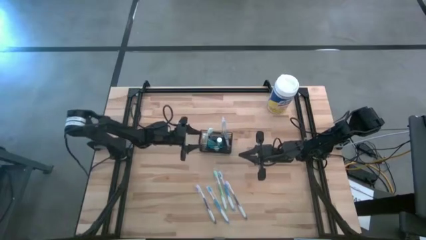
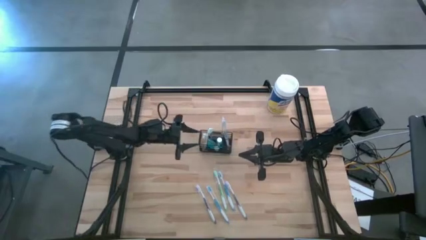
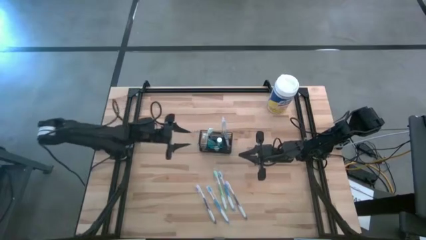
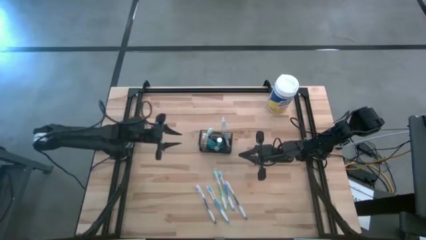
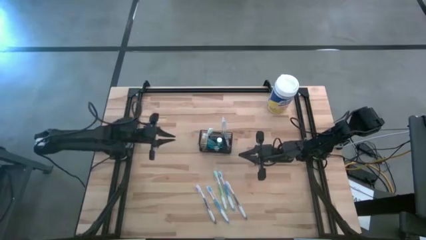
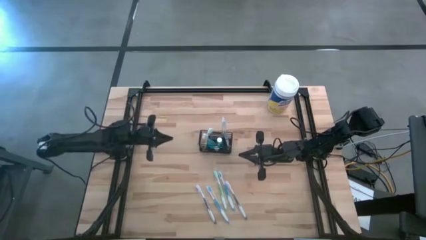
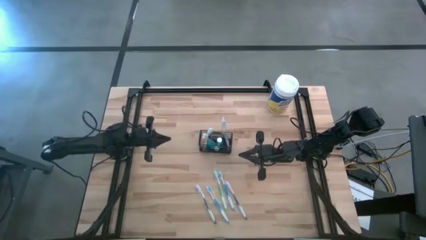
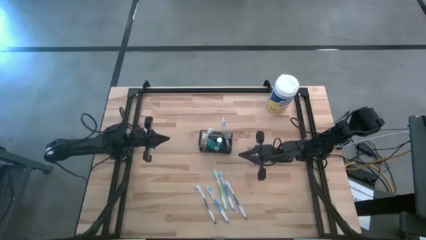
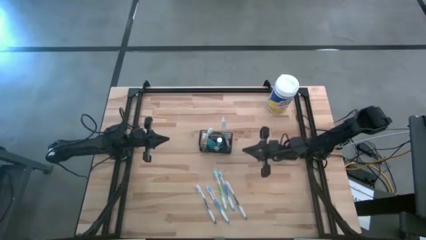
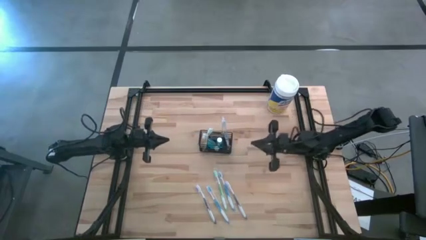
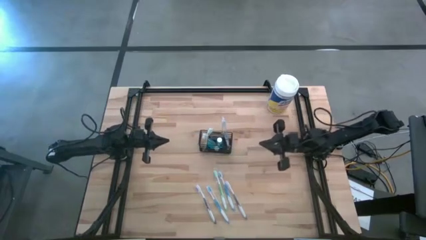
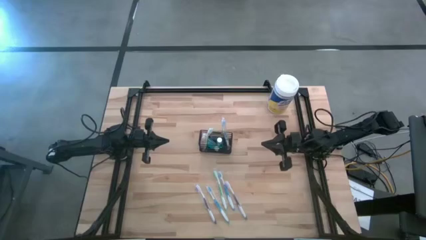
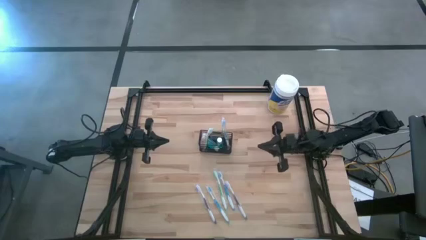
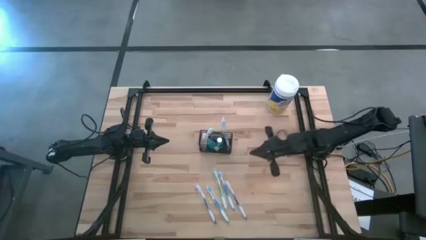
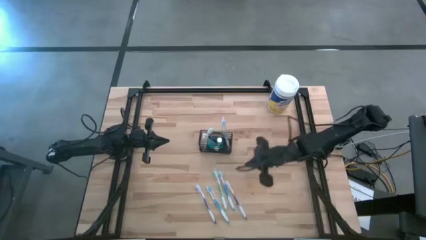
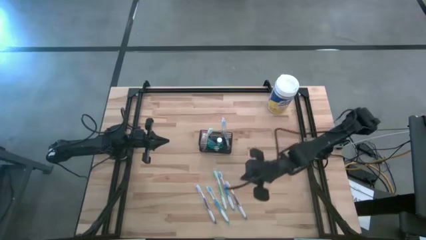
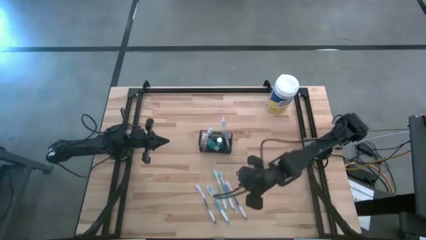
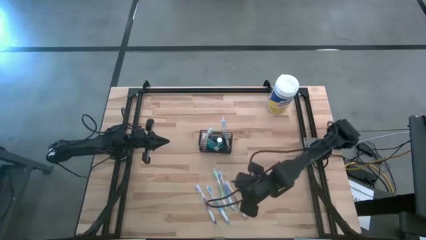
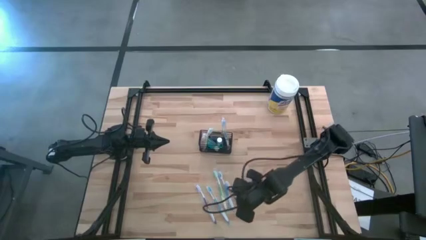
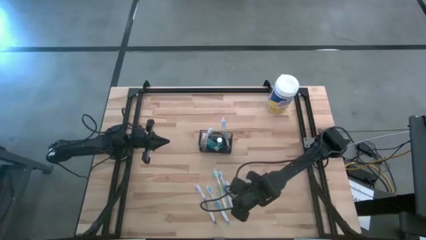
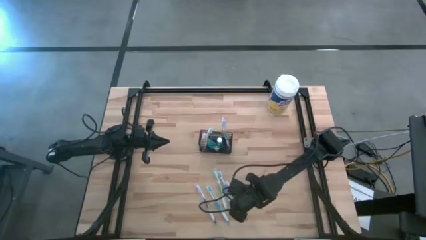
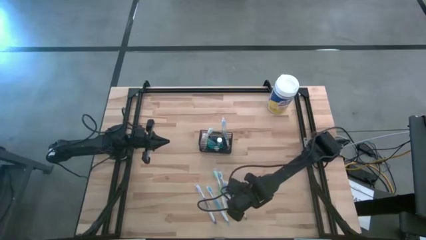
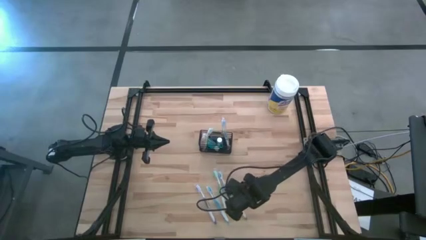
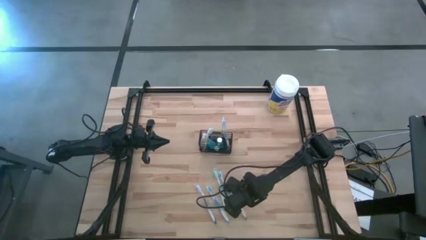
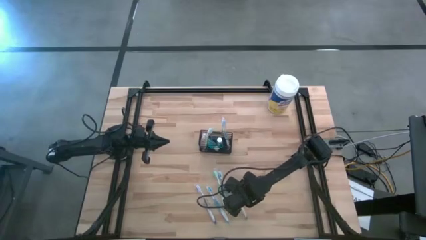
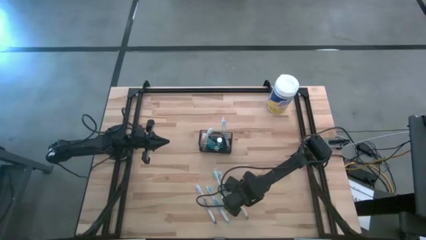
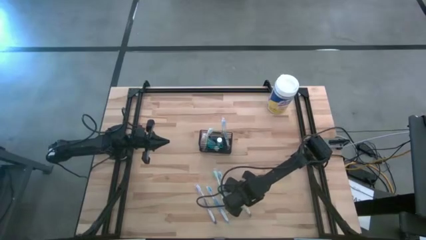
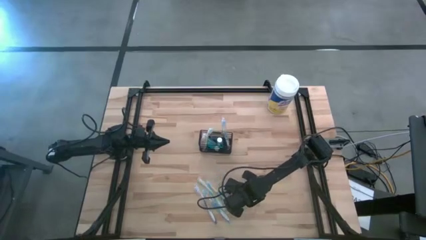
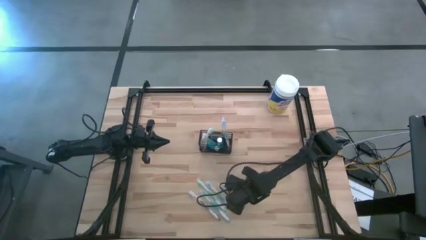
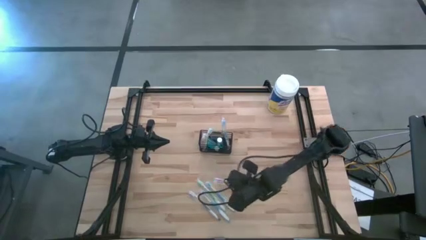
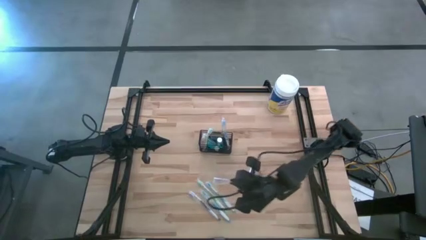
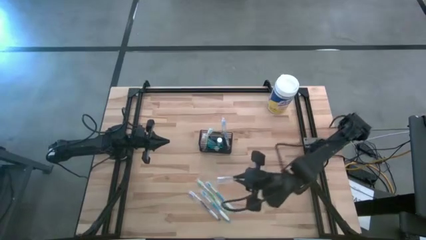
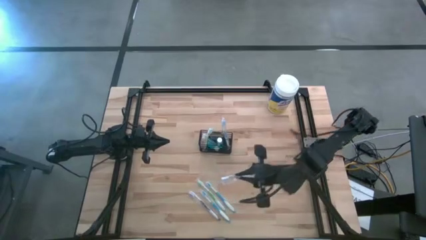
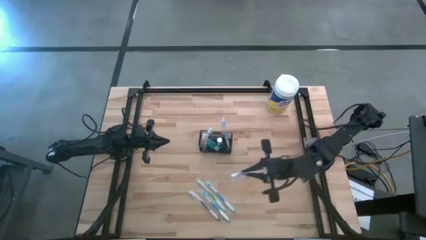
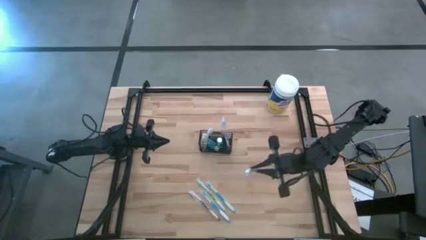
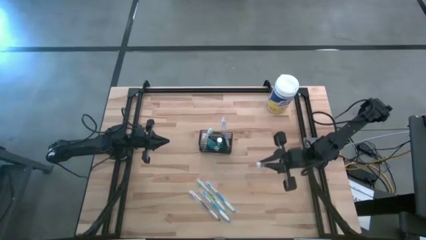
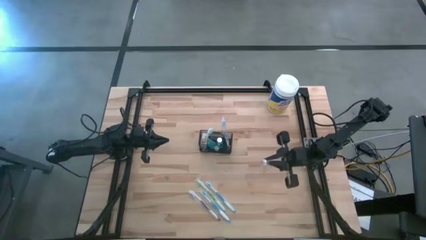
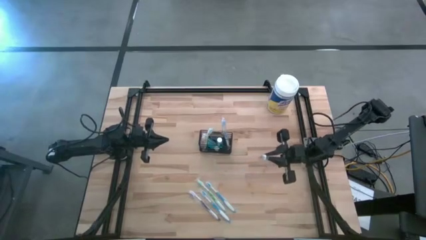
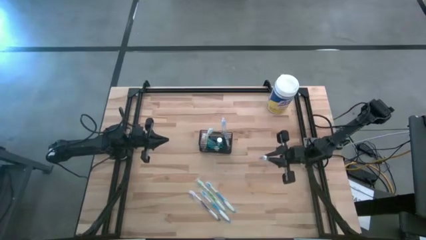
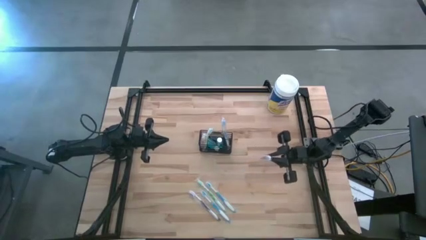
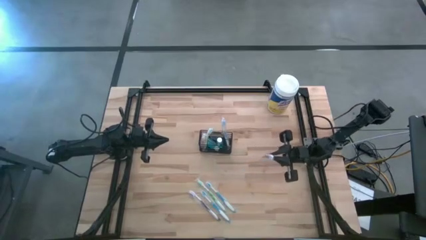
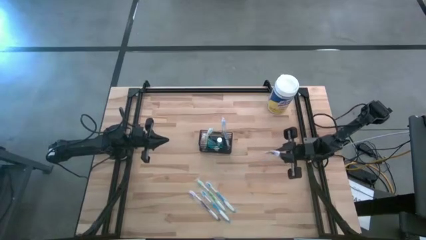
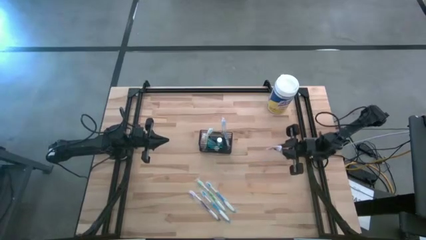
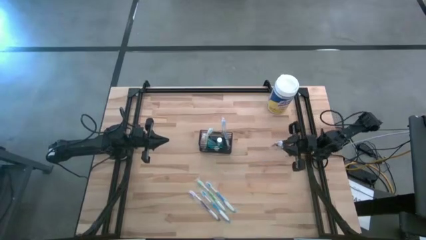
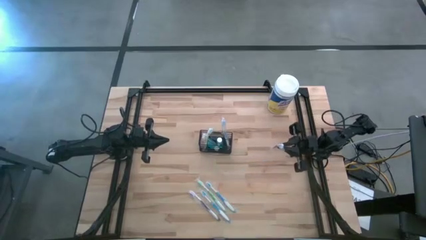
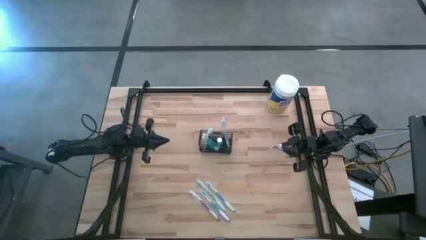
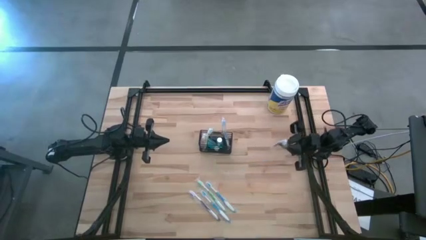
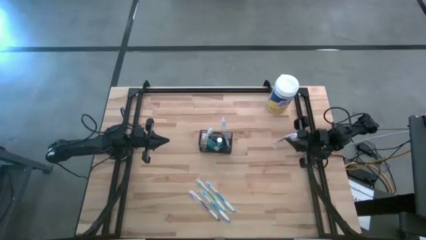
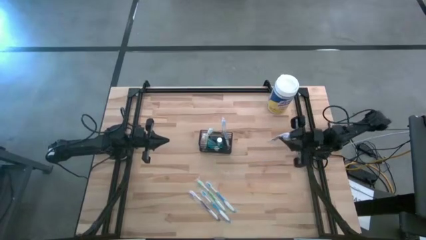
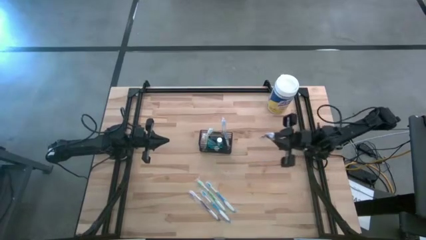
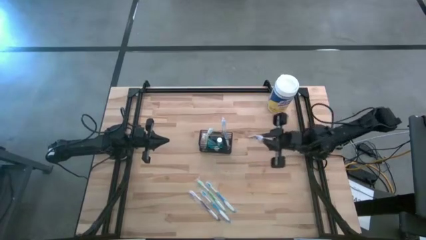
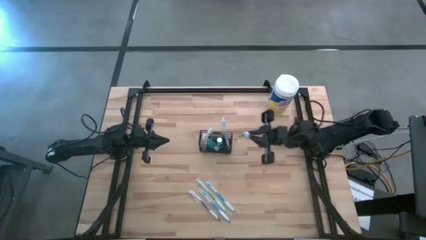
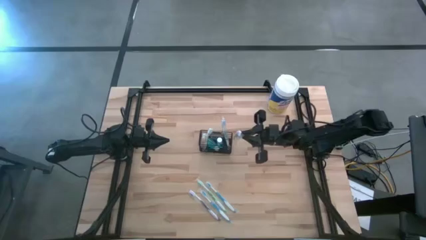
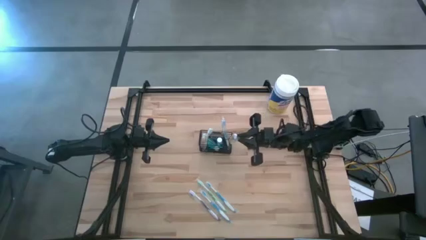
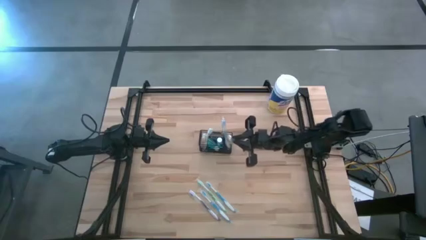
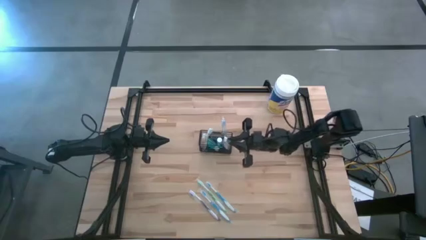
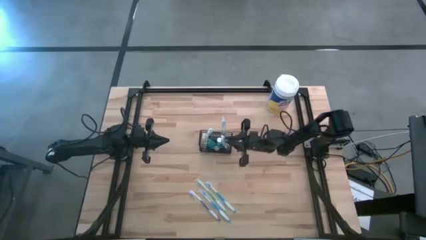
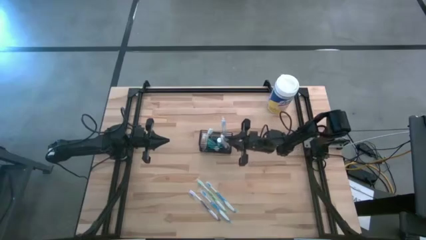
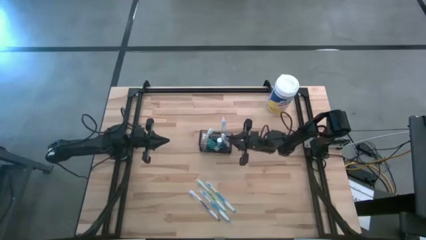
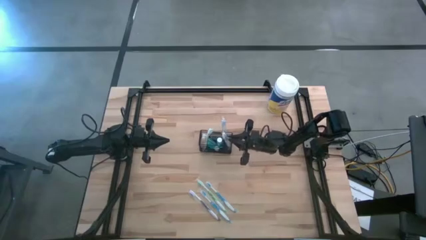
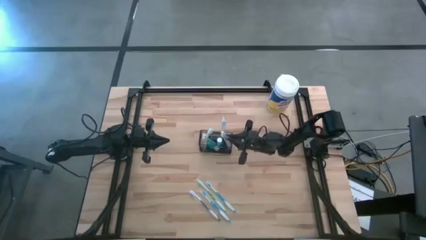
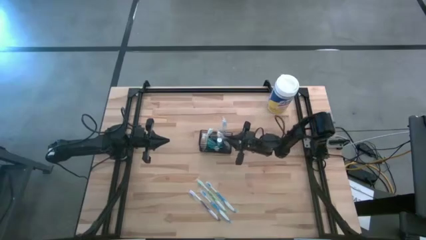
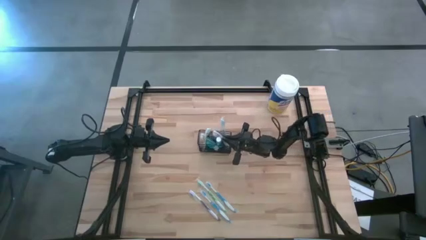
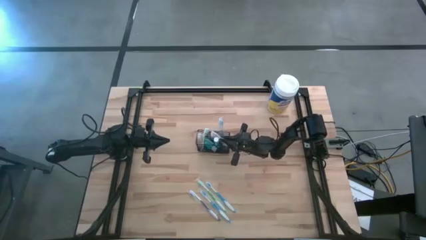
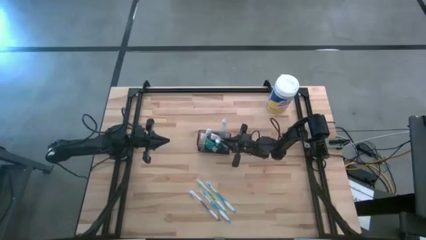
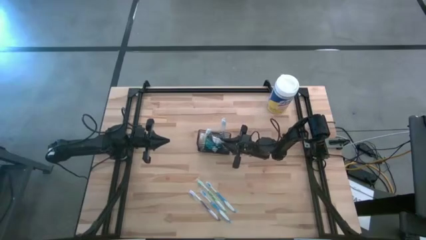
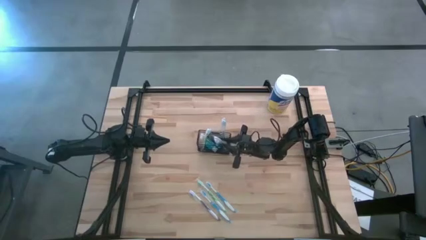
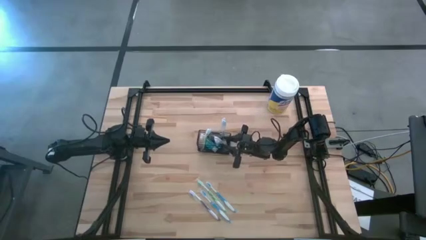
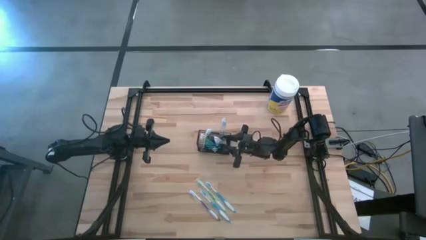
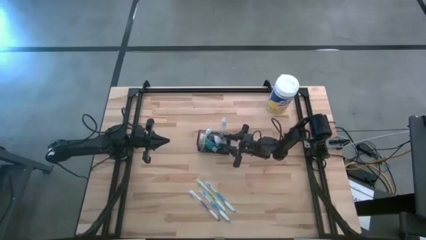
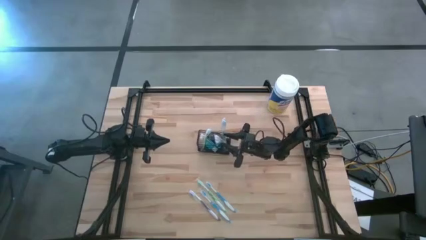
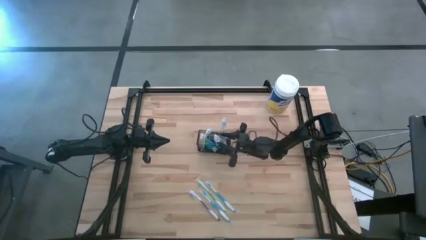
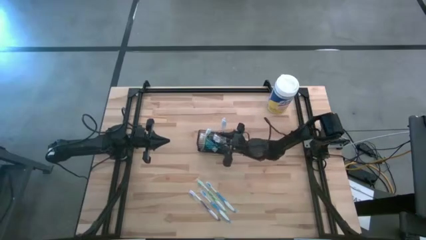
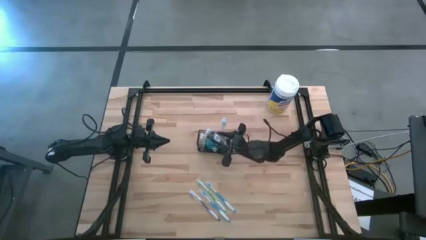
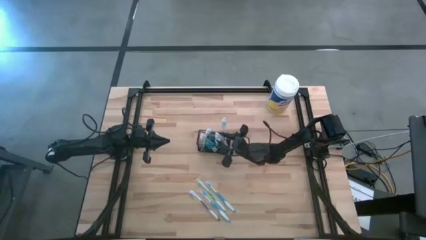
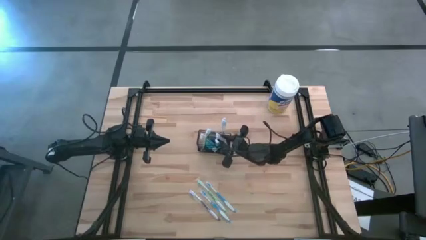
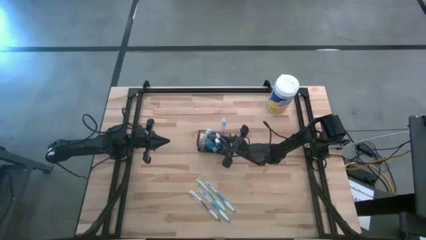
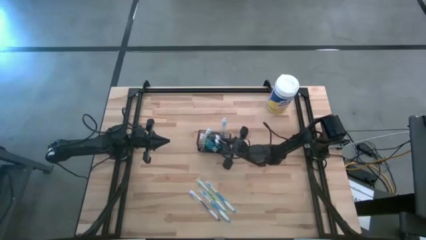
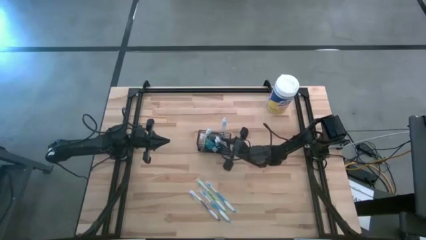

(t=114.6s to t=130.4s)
Task: Pick & Place toothbrushing station
Put the right purple toothbrush into the black wire organizer

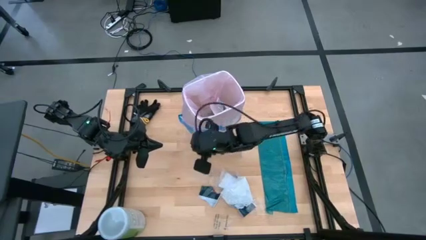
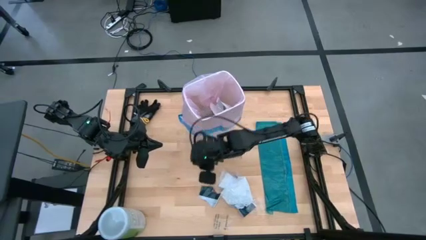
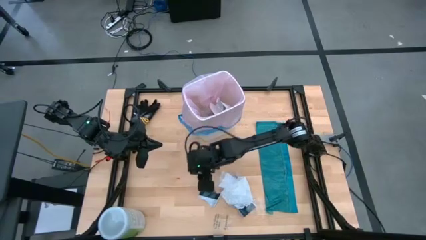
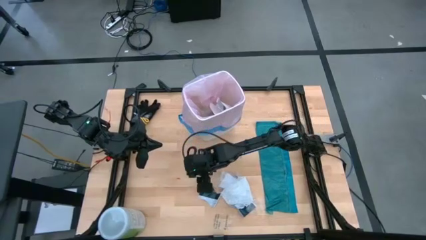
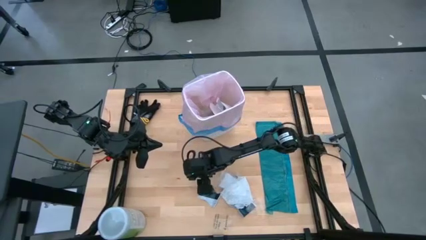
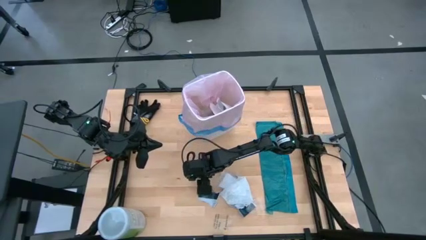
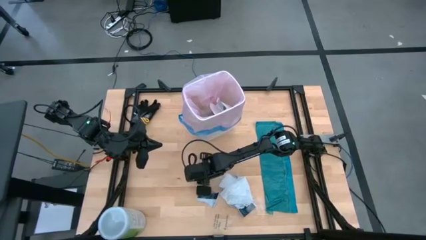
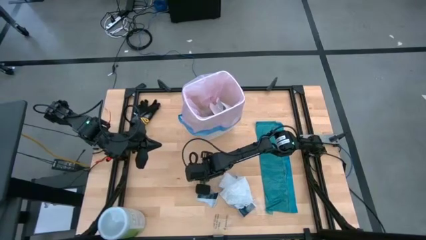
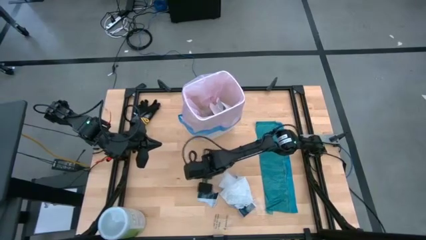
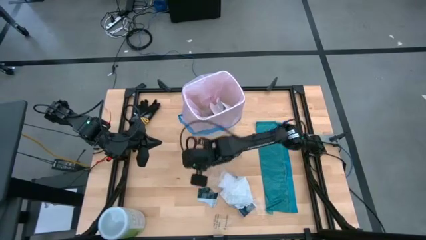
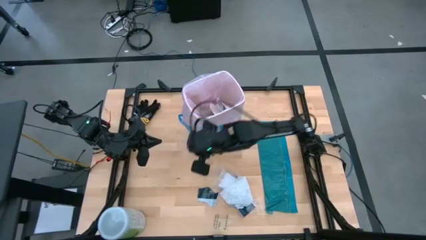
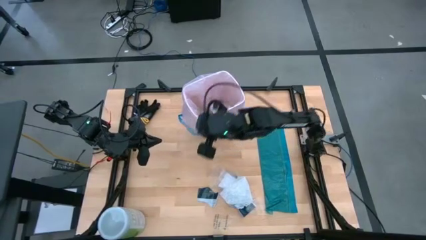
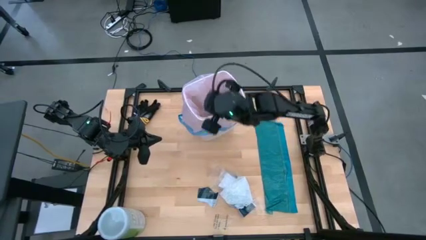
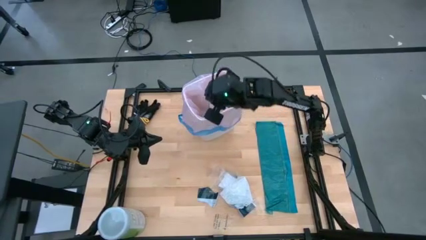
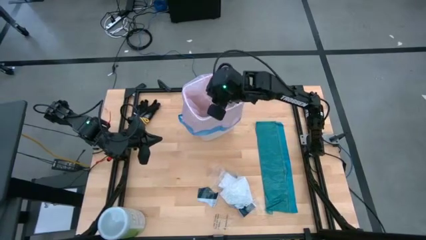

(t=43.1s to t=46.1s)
Task: place trash/remove bag and relplace
Put the transparent plastic into the white trash bin
